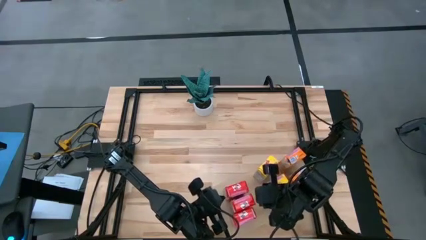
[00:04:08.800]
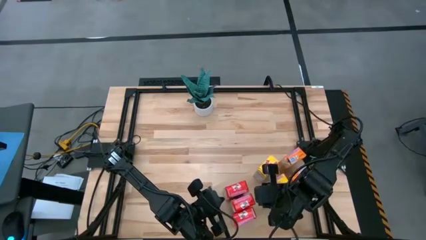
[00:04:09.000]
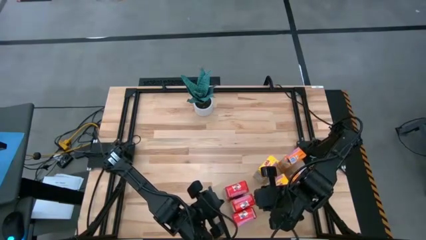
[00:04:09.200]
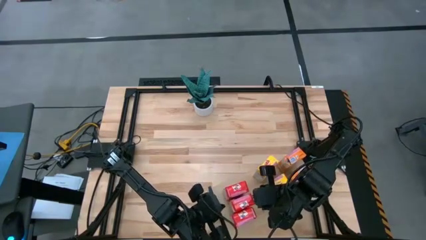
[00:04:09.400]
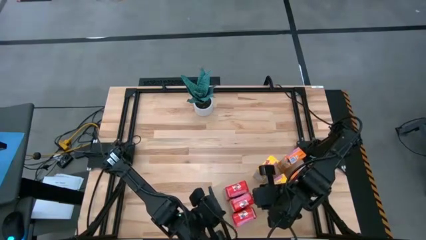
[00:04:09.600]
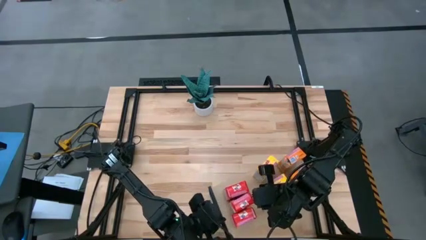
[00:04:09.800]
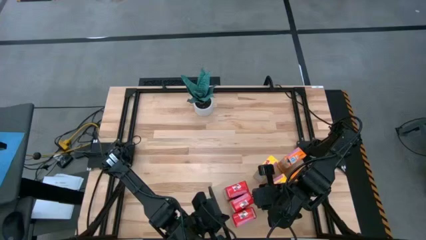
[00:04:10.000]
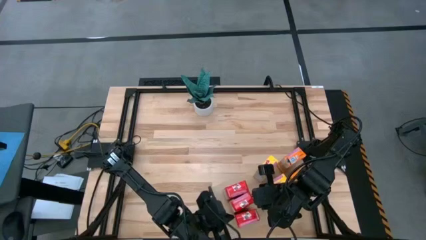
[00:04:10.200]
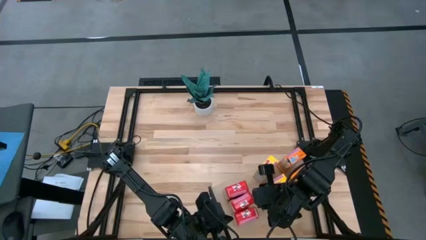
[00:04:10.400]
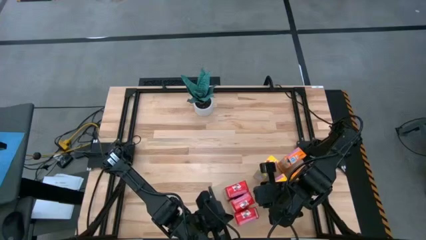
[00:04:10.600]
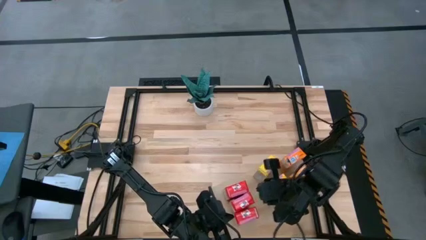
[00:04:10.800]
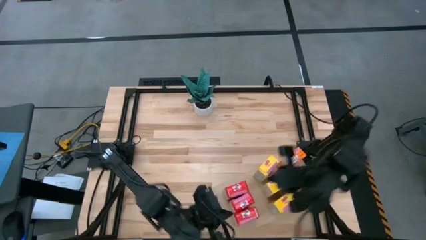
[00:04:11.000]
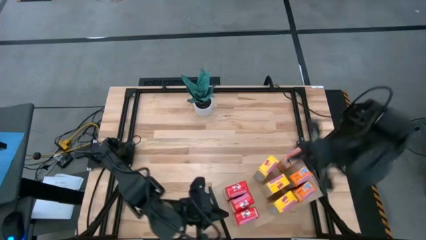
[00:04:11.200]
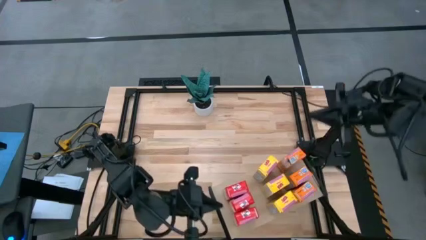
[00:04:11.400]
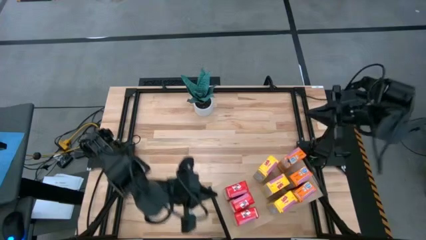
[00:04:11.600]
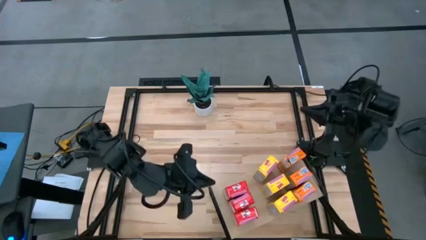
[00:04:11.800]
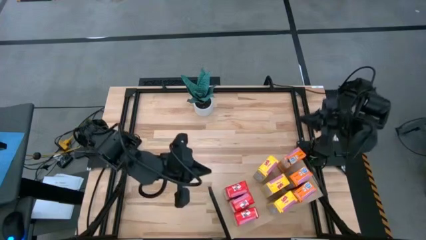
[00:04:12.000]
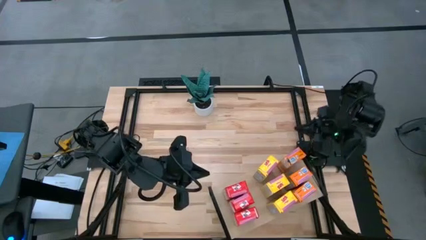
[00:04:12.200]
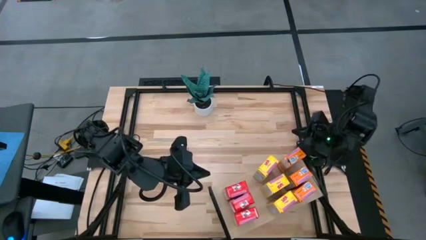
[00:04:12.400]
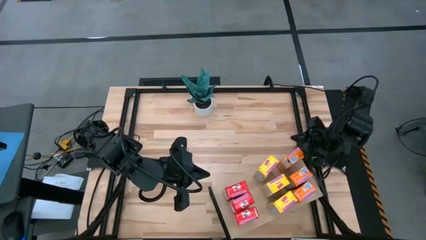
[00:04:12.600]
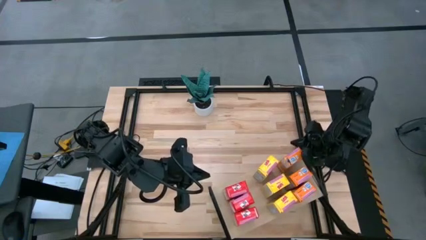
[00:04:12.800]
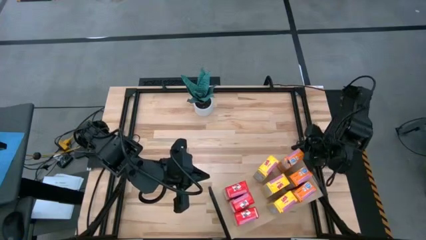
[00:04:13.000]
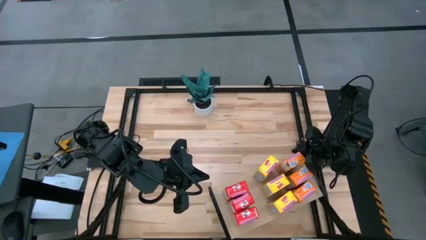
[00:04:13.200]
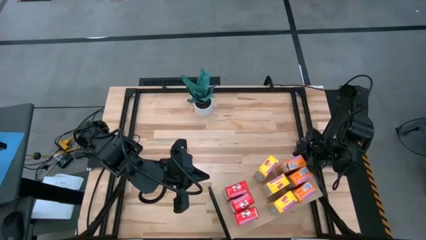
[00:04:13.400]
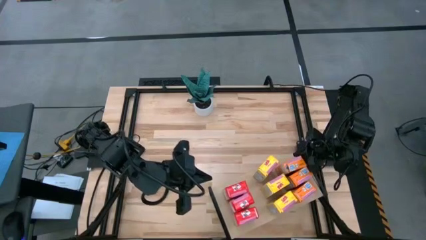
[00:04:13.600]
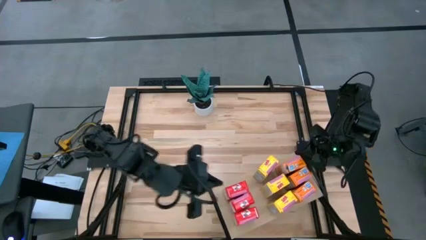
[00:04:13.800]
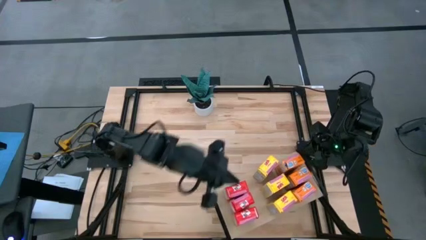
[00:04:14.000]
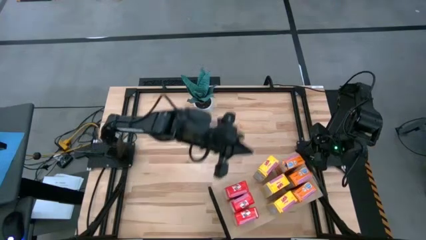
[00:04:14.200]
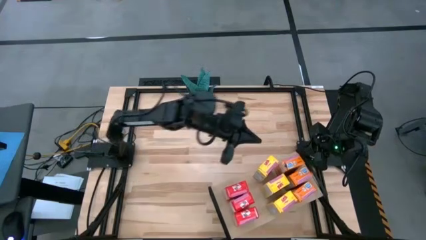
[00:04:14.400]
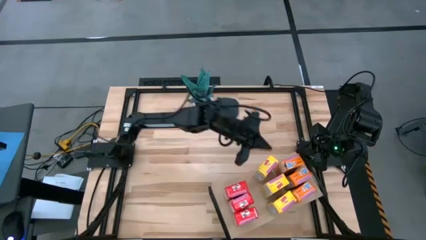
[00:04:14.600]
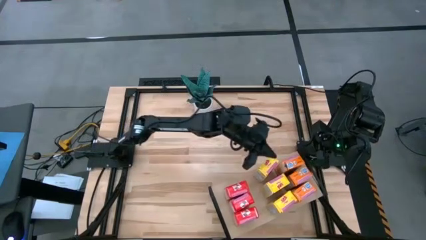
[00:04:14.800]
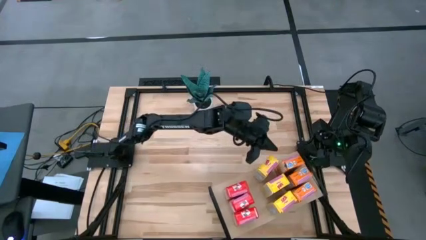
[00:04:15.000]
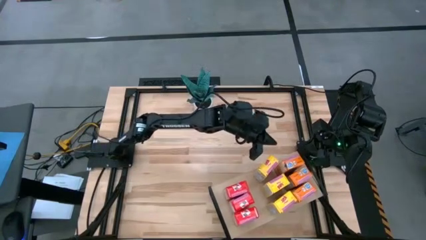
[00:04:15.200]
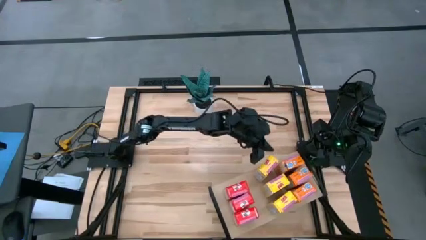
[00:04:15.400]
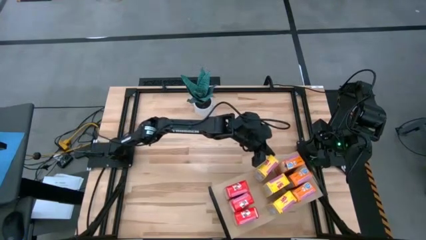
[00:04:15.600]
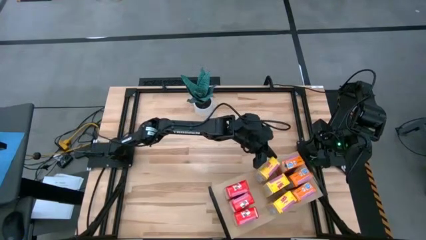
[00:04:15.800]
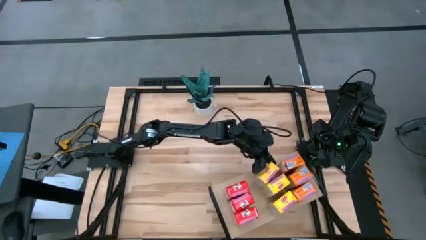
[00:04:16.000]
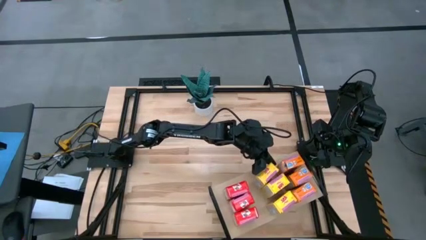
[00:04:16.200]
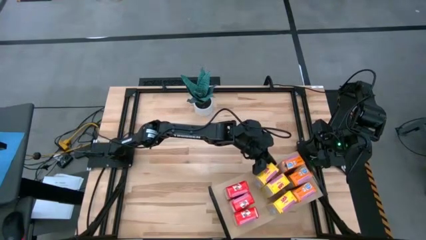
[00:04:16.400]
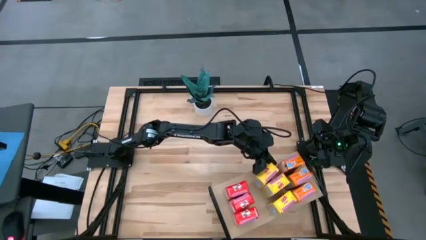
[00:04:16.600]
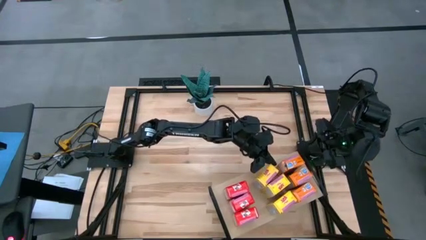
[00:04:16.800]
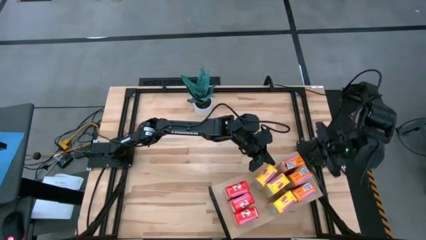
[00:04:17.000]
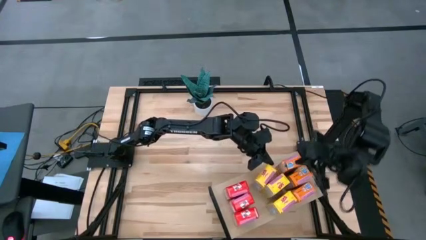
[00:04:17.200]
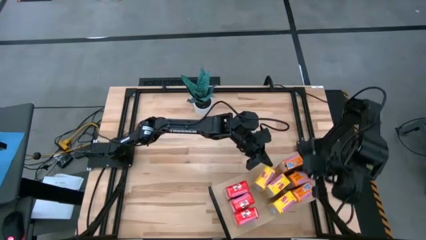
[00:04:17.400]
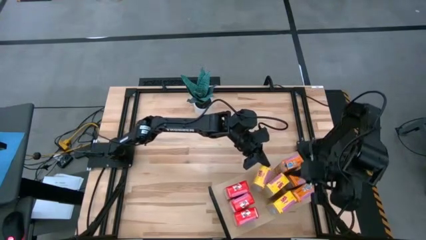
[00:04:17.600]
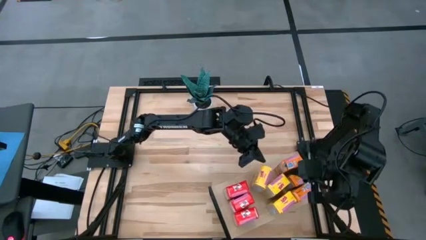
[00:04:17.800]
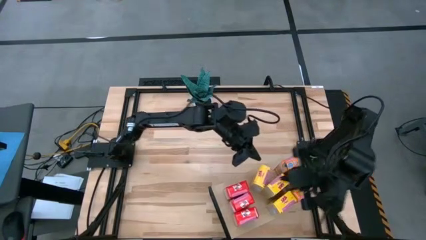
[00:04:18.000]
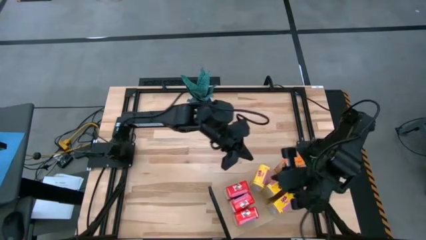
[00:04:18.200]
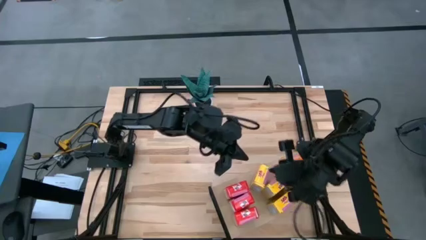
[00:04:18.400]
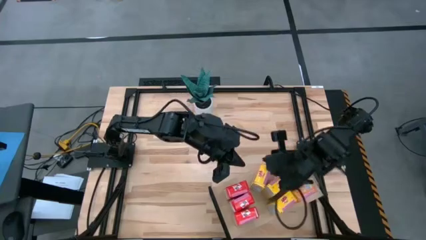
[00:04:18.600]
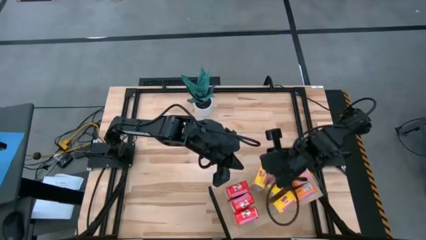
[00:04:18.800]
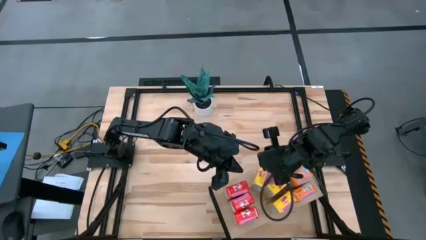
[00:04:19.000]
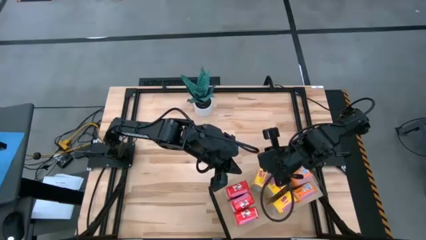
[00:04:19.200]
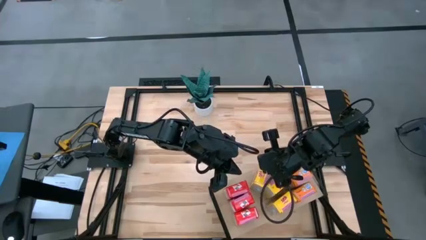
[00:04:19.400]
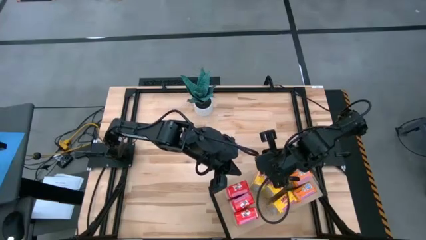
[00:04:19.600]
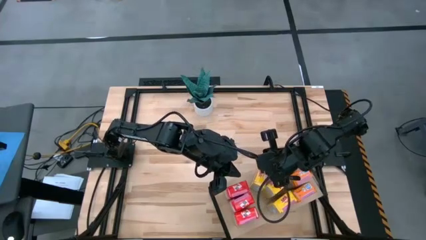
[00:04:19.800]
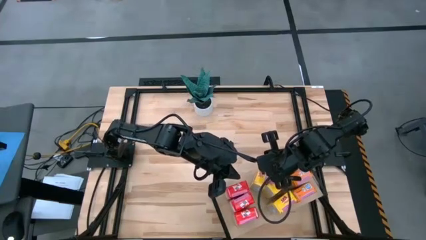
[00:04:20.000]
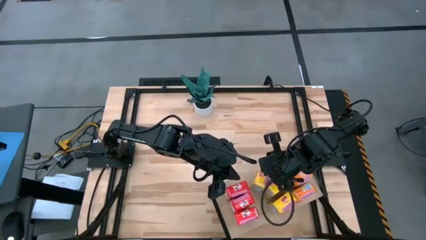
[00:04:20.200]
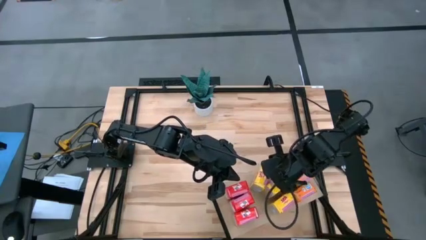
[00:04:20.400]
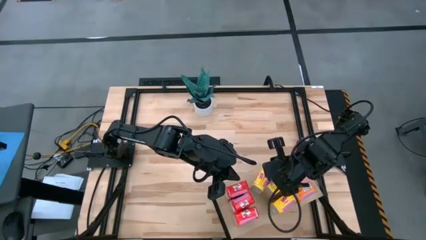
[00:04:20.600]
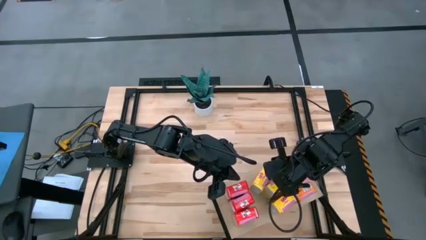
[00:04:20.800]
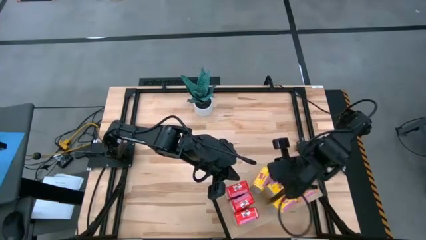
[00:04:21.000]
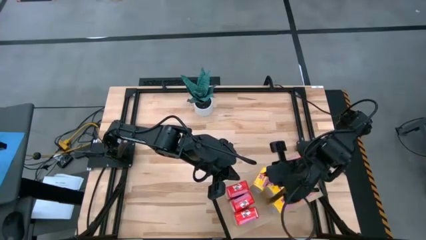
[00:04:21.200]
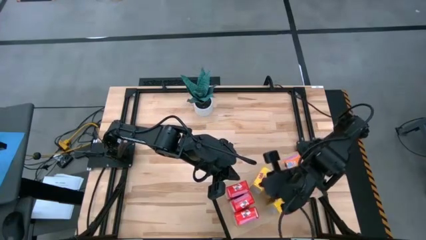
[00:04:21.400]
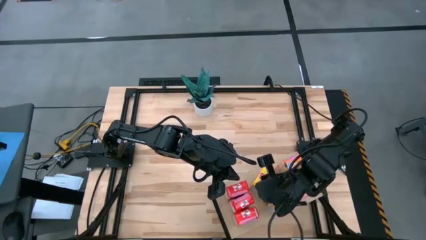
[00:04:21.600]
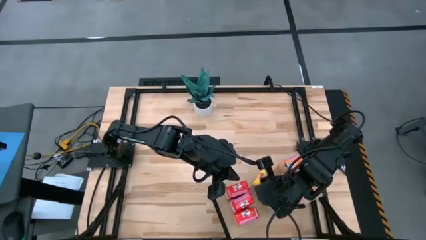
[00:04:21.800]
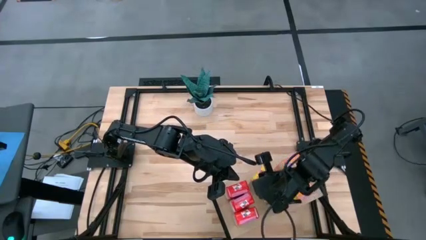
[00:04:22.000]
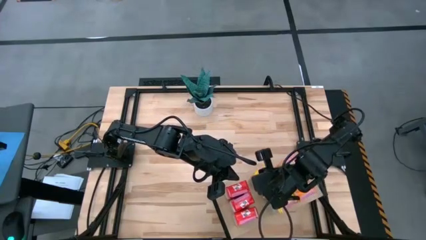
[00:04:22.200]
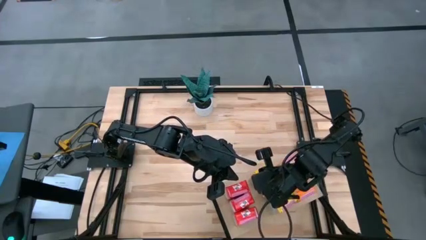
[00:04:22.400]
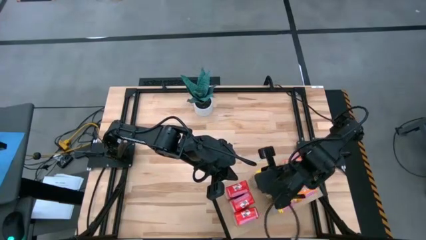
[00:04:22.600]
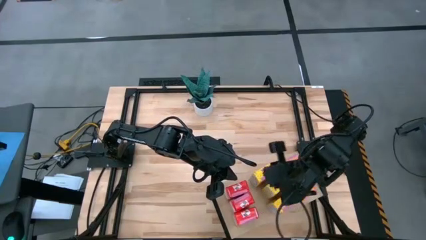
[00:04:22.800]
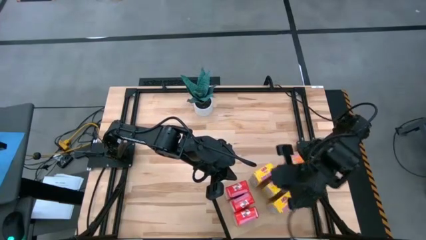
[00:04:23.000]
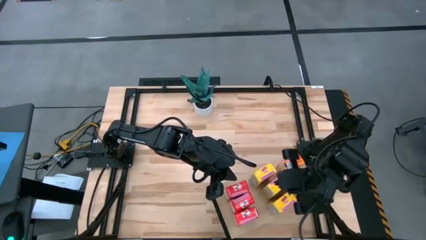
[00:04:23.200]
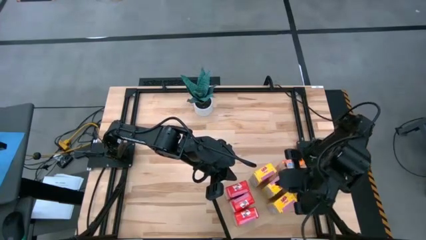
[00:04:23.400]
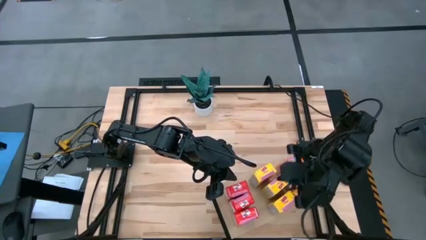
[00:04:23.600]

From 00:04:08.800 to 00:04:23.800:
Task: Stack cereal on shelf
Adjust the colored cereal boxes on the shelf
